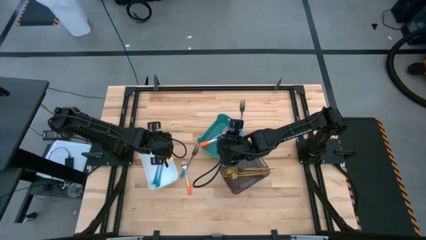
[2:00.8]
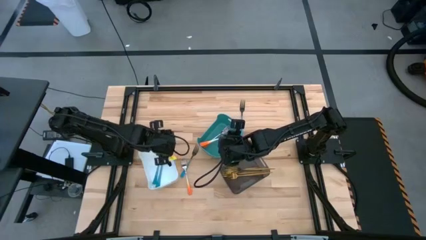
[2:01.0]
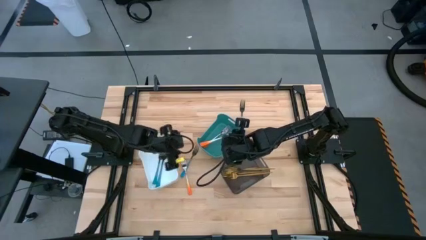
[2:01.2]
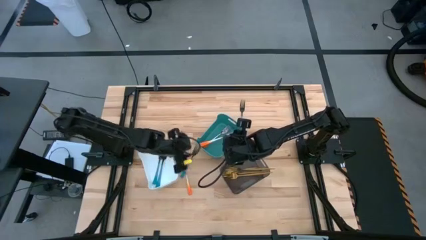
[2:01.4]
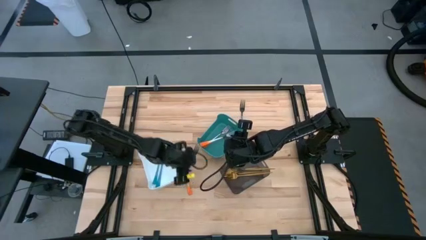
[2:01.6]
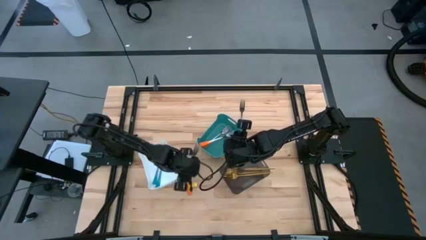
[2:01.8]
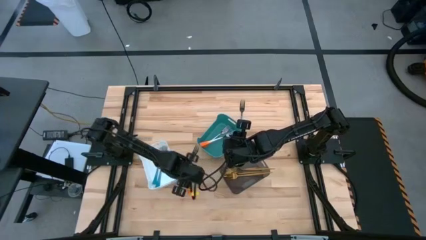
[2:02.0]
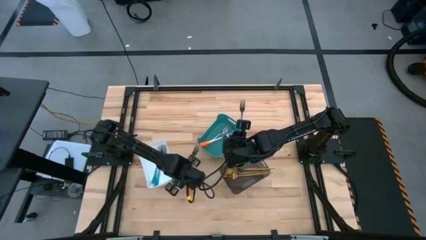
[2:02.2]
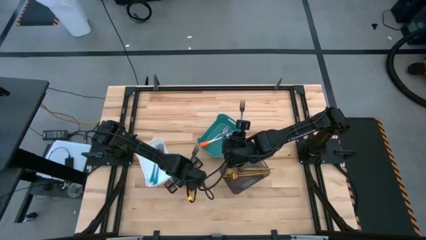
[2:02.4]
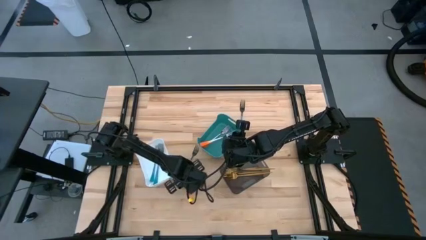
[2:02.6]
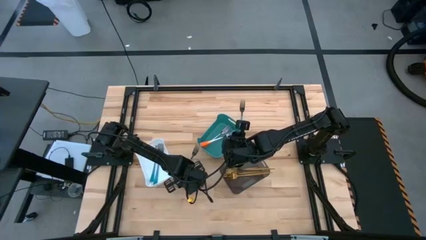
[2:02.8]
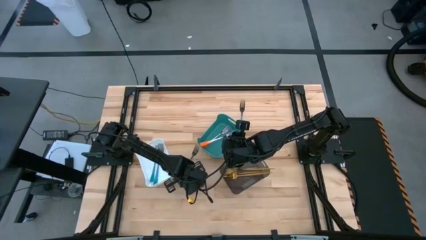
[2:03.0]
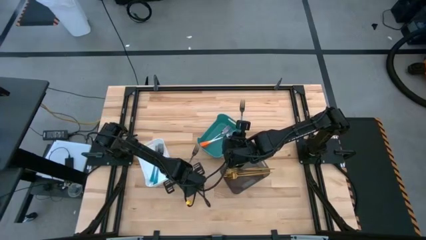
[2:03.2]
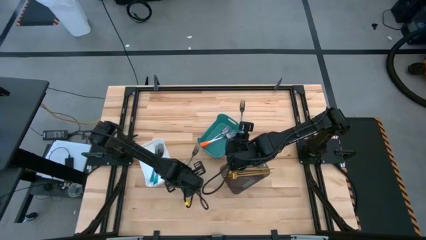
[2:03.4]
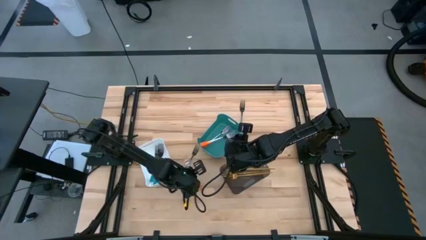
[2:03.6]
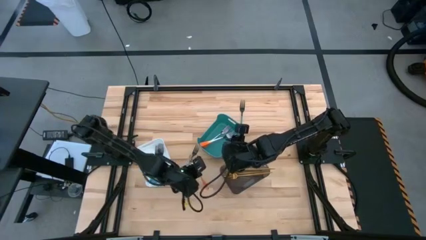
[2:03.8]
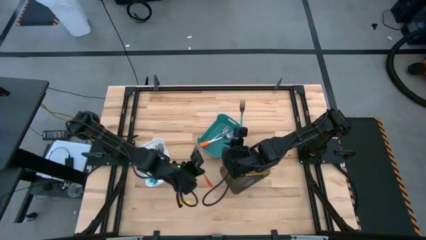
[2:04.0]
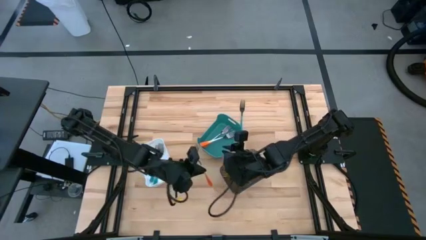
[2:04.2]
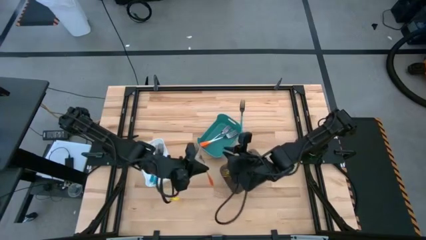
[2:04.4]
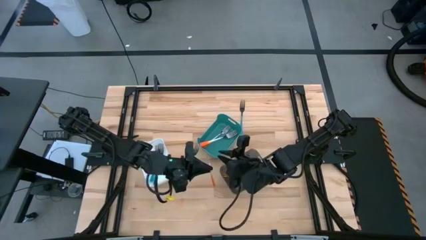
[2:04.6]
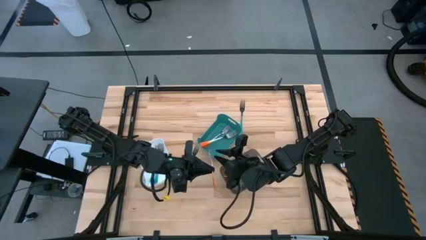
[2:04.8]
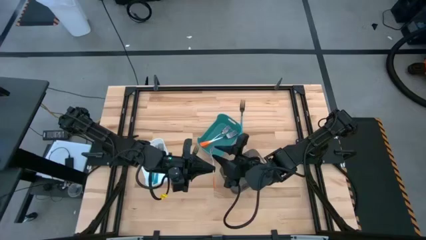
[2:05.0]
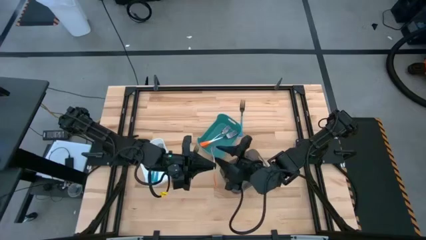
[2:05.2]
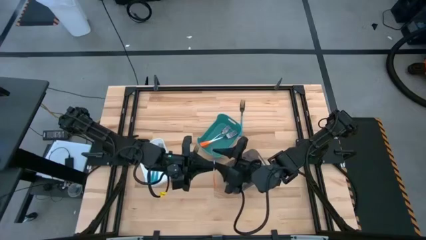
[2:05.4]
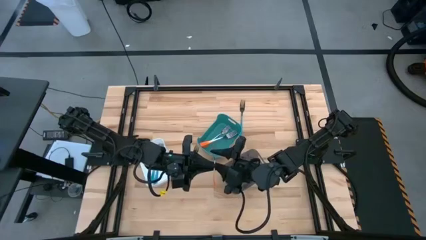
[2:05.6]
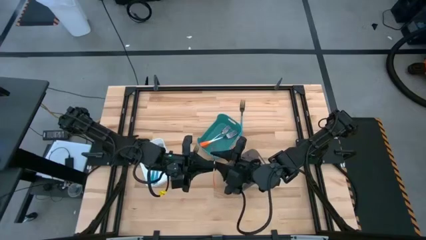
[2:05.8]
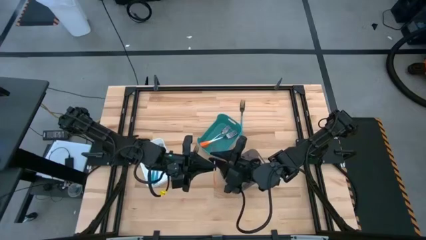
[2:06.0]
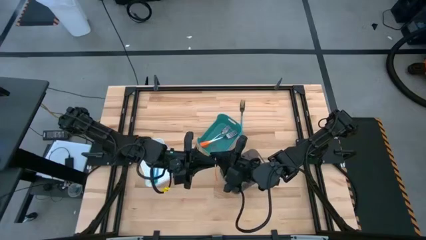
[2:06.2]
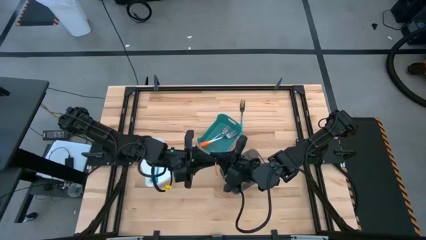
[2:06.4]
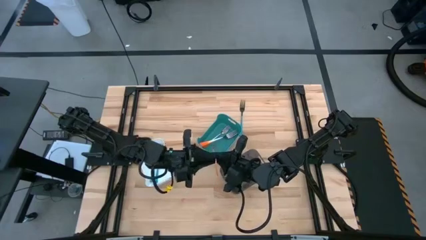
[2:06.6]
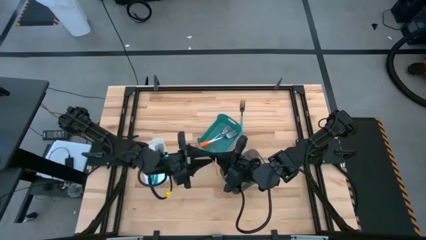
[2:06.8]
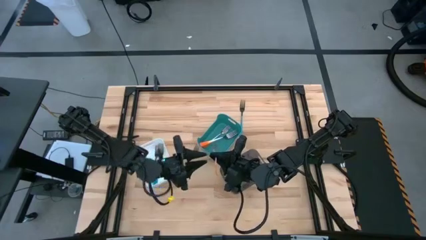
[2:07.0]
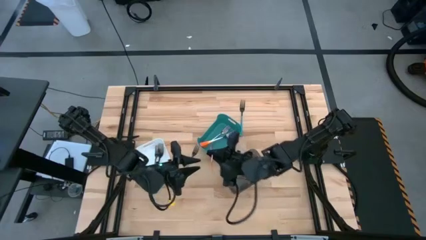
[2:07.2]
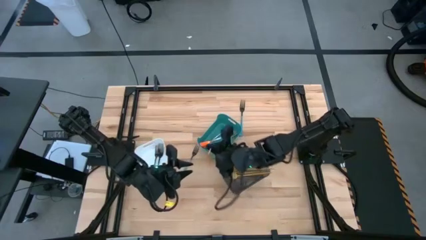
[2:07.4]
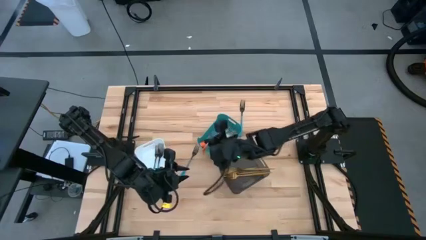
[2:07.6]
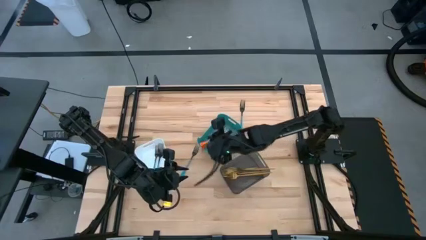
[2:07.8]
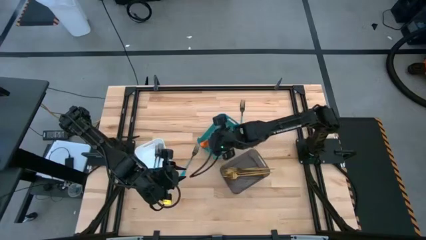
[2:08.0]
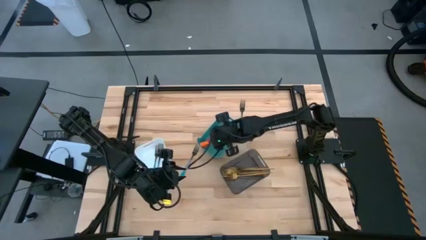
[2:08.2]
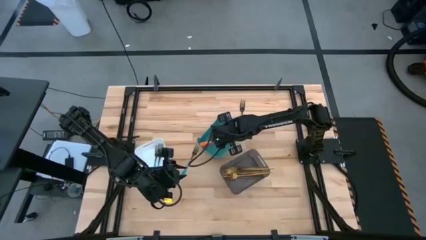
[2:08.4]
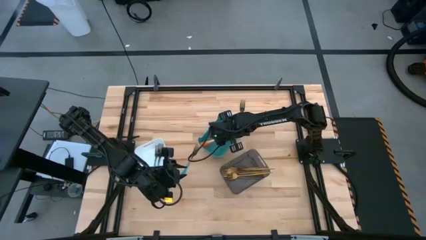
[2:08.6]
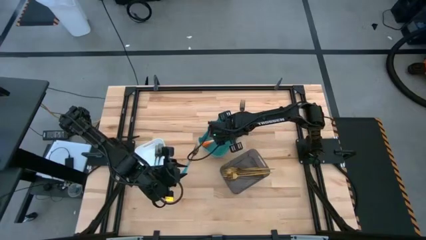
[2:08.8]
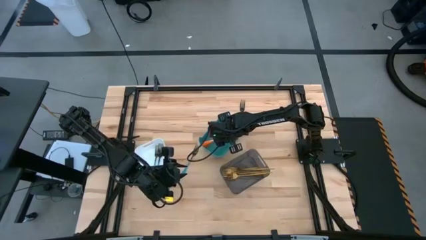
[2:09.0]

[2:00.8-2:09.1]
Task: Sort silverware by color (type)
Put the orange silver fork into the blue bin

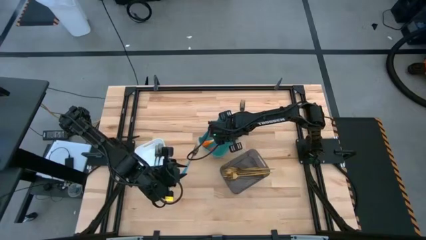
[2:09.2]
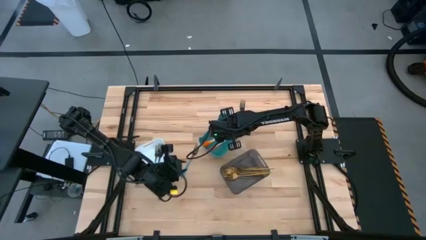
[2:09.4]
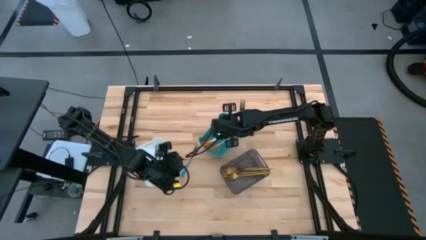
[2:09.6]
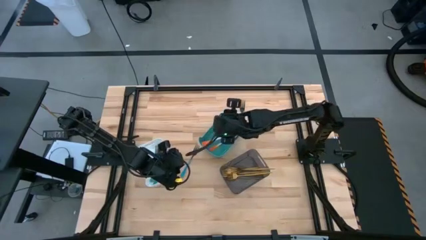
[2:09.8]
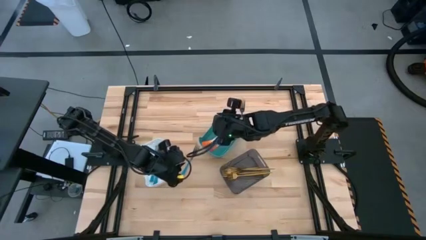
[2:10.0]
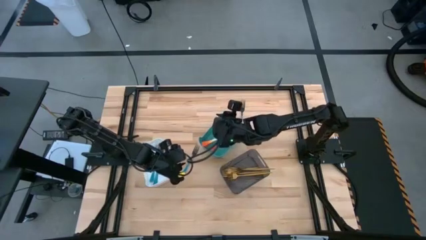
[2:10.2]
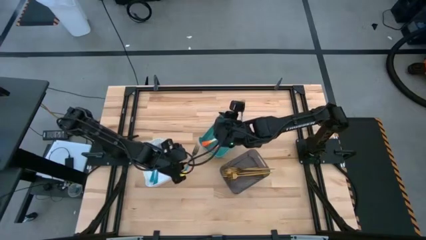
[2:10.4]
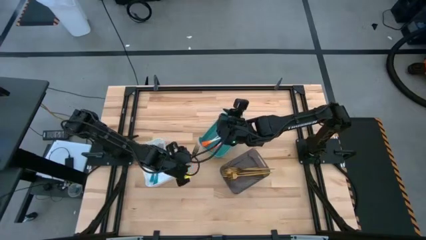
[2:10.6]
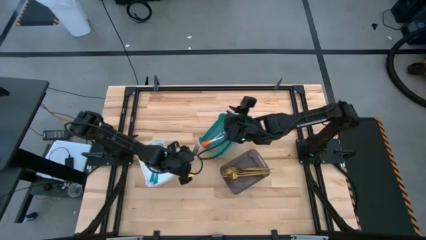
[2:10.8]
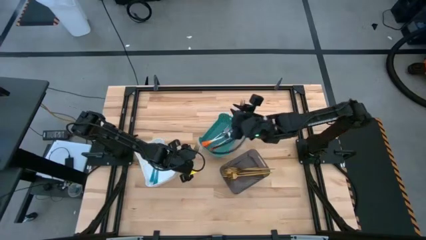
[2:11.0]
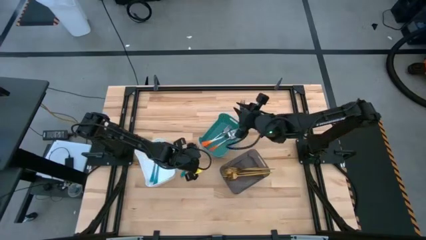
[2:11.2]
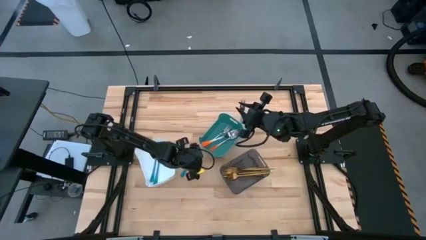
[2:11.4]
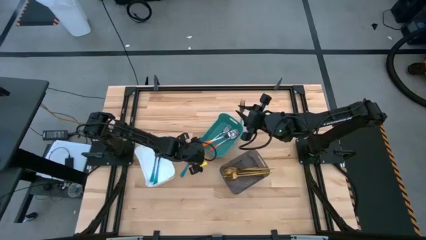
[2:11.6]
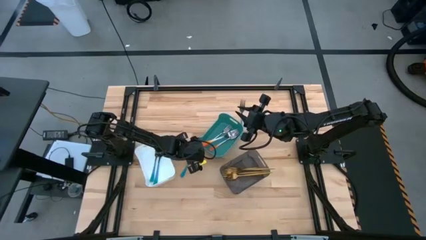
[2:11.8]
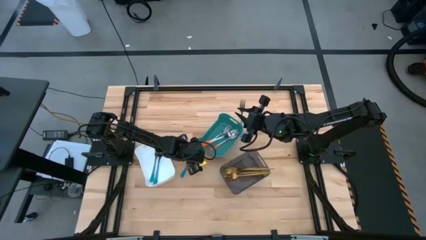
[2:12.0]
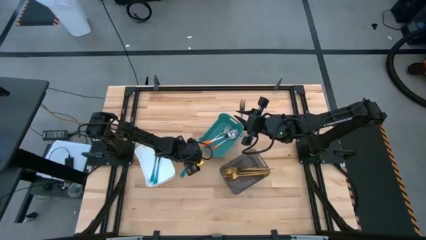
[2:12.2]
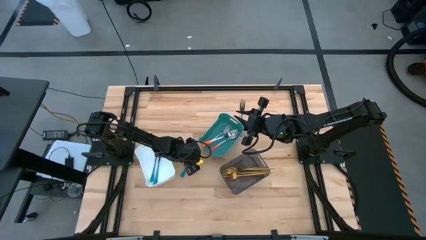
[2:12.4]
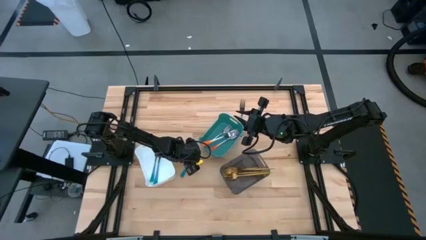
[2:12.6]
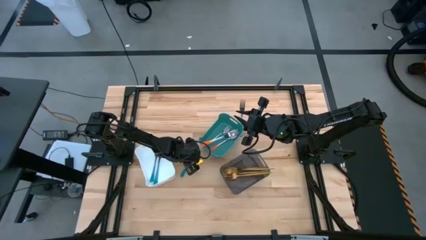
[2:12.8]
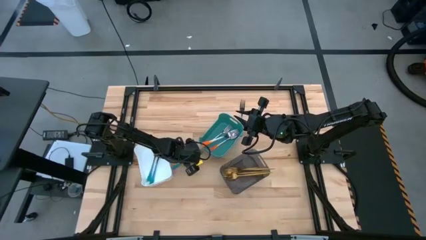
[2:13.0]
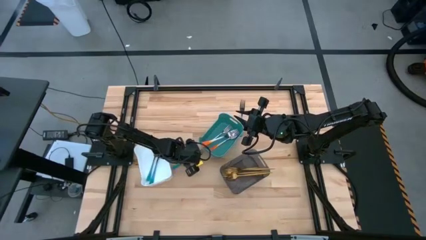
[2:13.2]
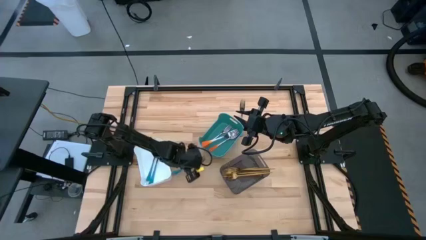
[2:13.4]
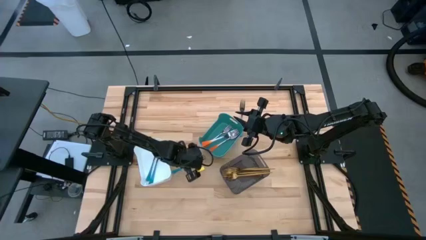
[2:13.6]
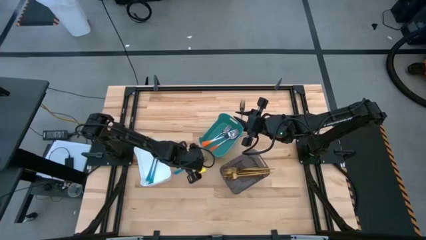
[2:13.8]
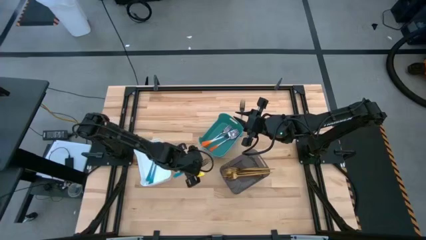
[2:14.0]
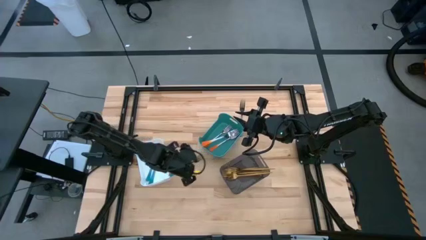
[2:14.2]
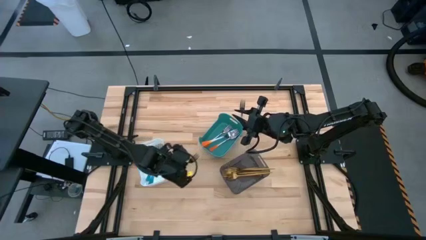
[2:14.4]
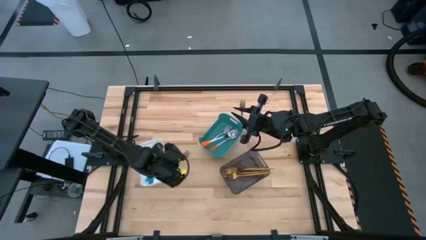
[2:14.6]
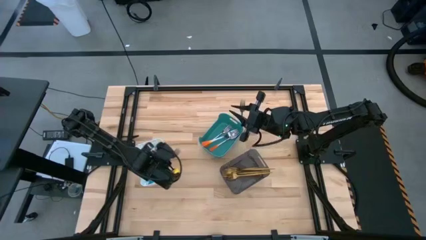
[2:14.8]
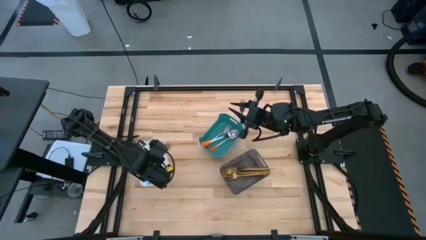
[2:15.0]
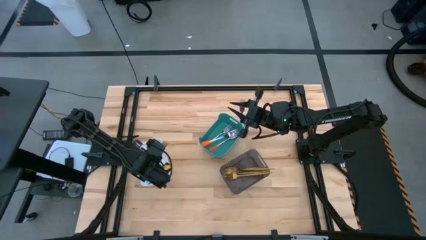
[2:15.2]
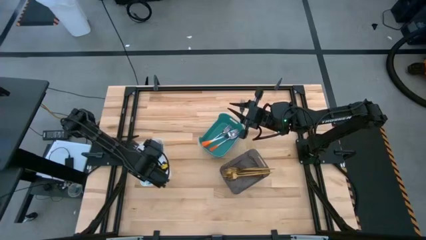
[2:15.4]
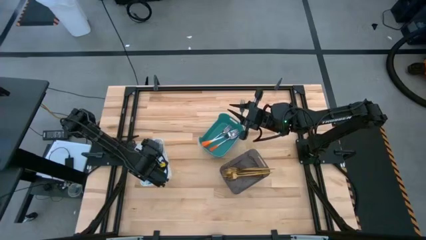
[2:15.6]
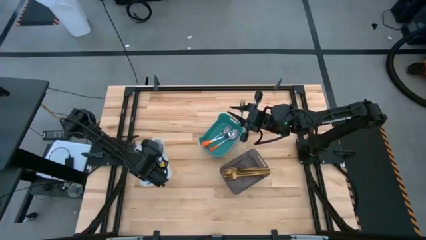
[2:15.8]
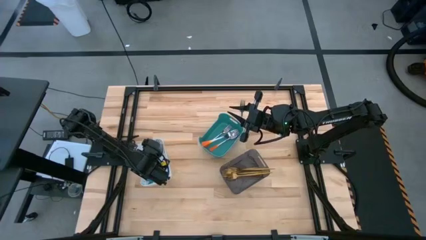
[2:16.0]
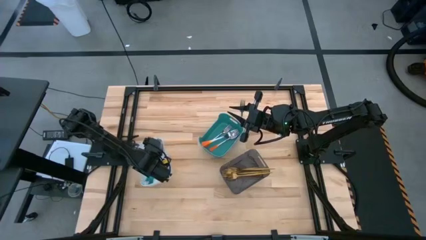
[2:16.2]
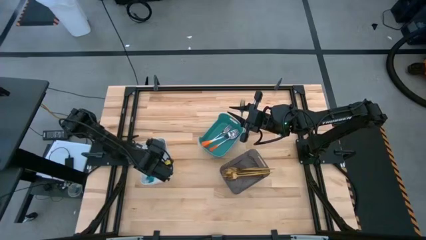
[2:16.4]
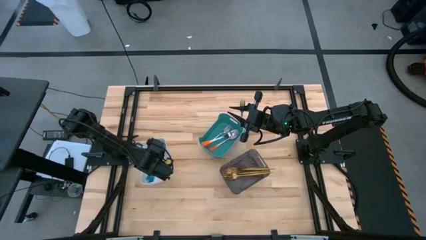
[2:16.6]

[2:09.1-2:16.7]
Put the blue silver fork into the white bin

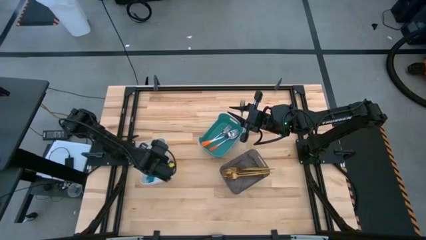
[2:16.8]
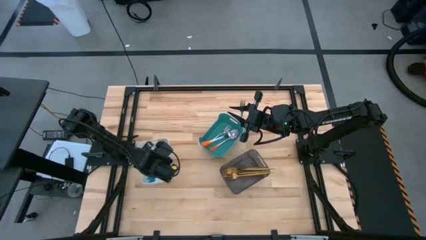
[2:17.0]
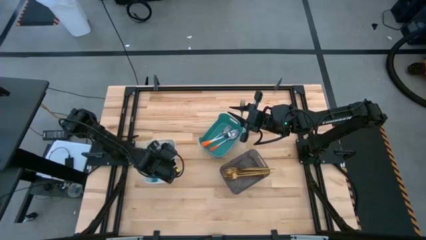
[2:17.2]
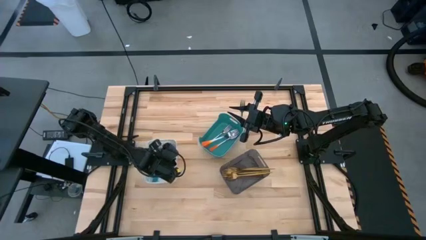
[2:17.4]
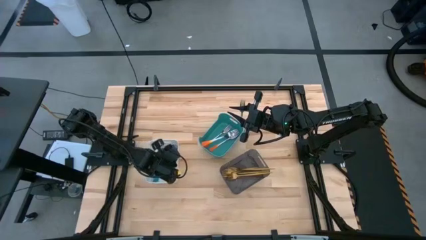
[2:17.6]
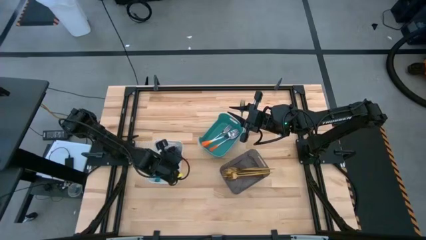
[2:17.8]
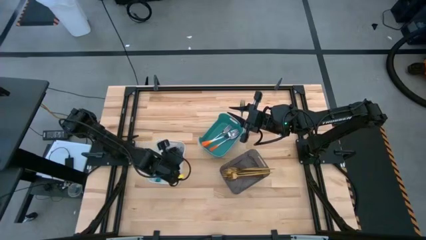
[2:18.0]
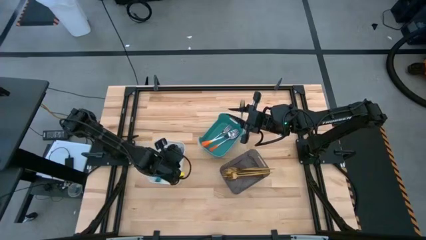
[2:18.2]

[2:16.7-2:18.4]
Adjust the white bin
